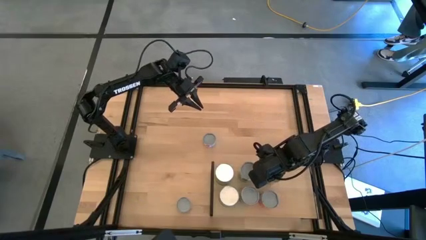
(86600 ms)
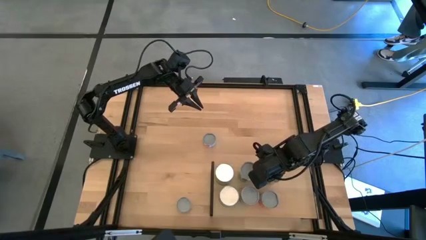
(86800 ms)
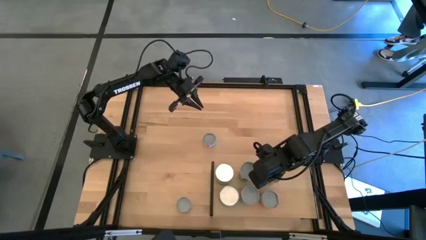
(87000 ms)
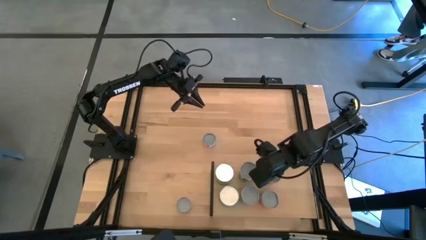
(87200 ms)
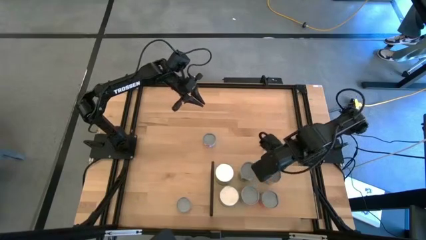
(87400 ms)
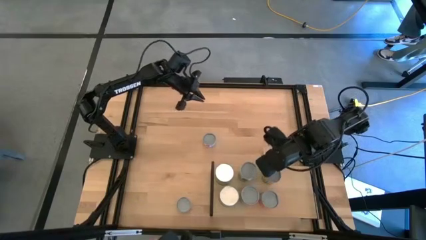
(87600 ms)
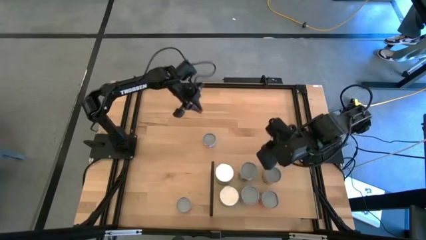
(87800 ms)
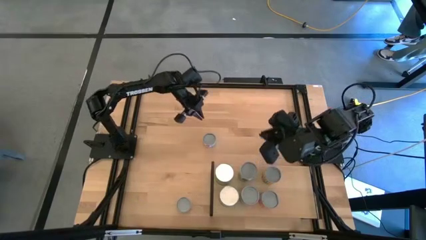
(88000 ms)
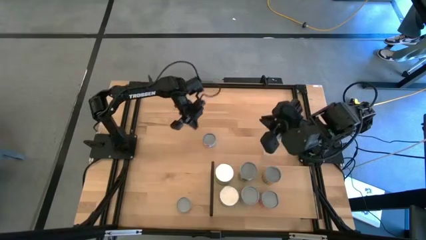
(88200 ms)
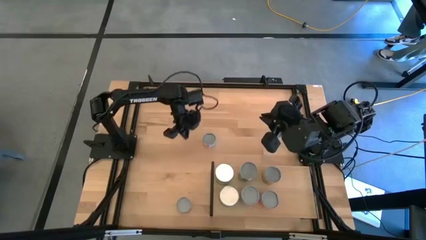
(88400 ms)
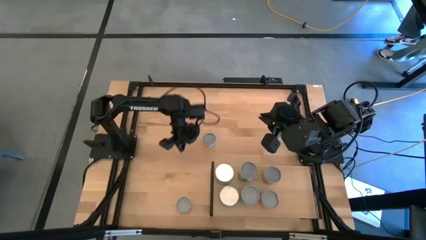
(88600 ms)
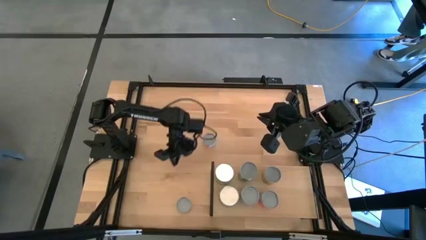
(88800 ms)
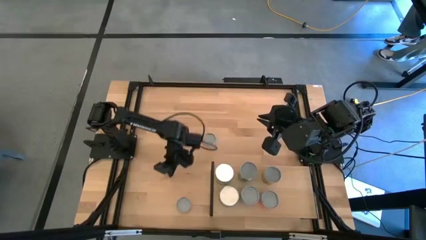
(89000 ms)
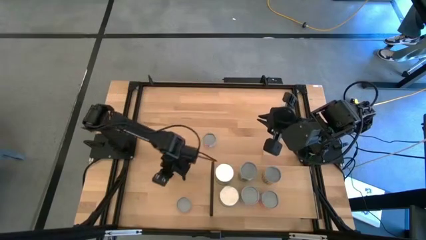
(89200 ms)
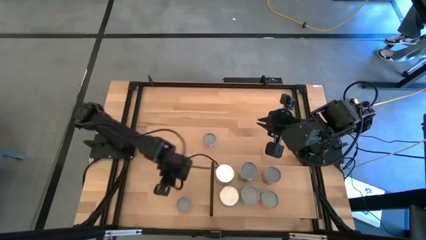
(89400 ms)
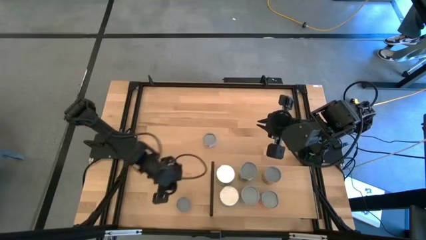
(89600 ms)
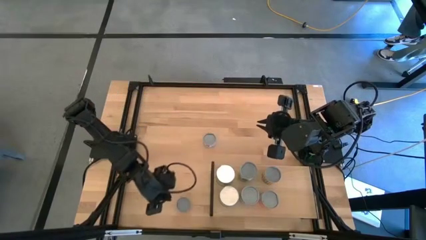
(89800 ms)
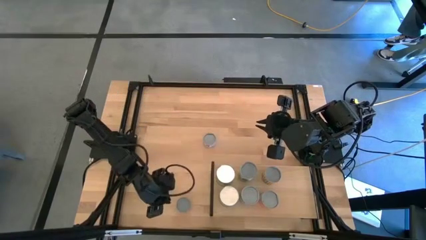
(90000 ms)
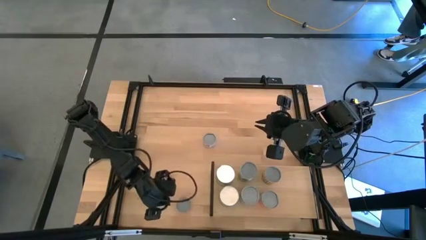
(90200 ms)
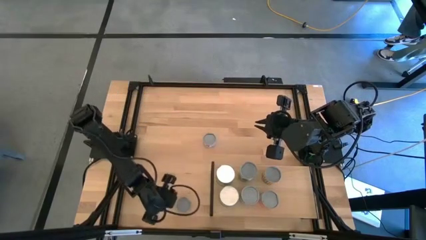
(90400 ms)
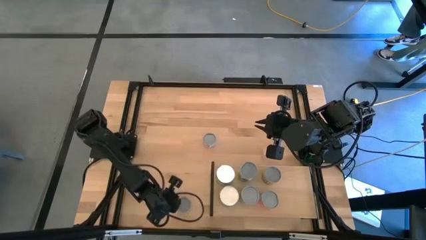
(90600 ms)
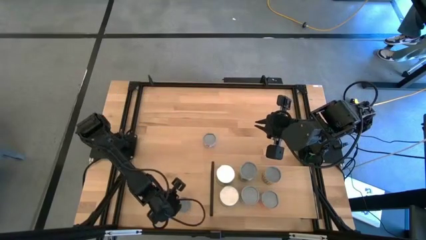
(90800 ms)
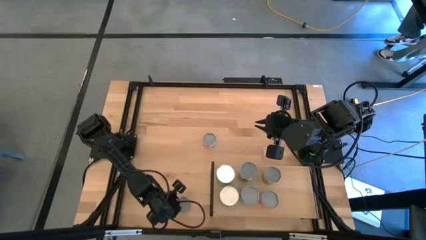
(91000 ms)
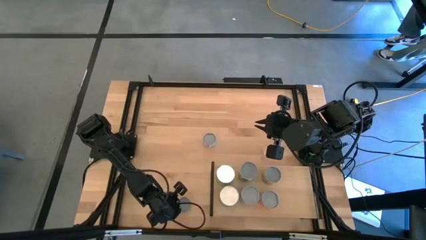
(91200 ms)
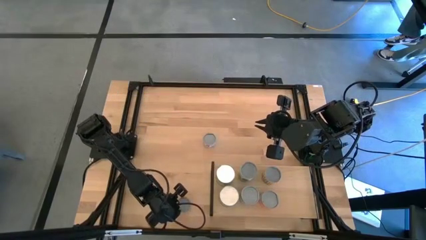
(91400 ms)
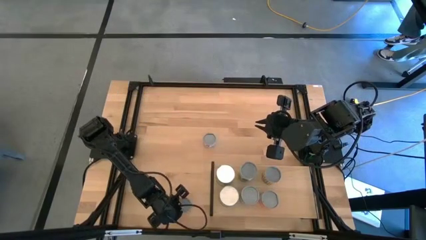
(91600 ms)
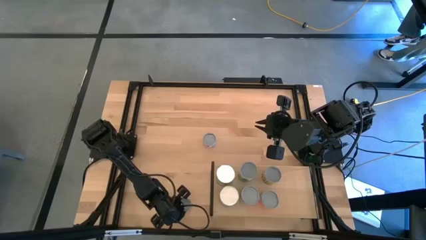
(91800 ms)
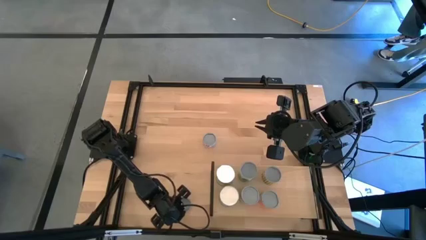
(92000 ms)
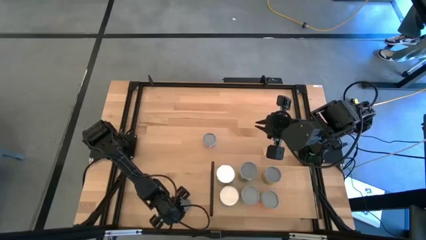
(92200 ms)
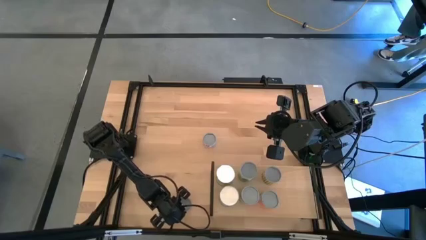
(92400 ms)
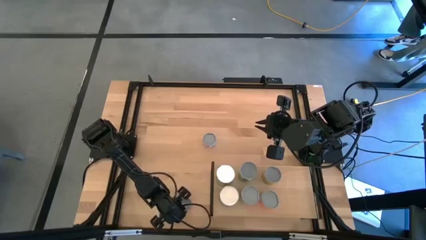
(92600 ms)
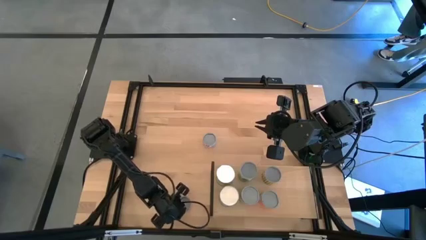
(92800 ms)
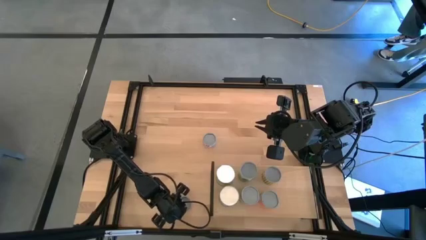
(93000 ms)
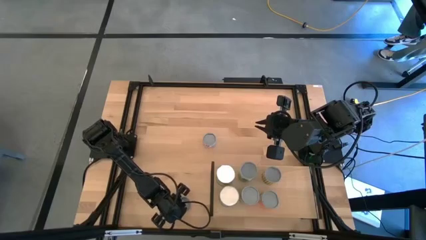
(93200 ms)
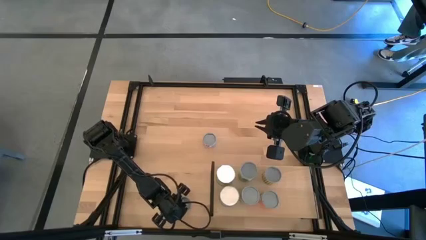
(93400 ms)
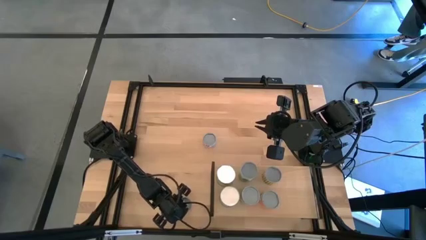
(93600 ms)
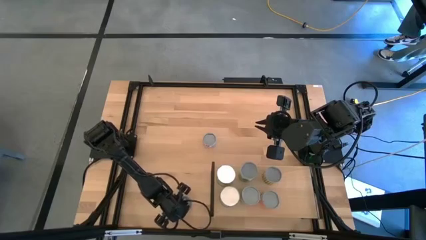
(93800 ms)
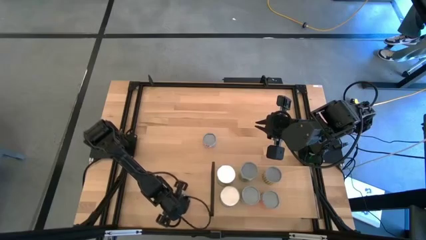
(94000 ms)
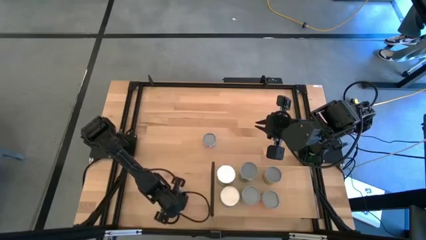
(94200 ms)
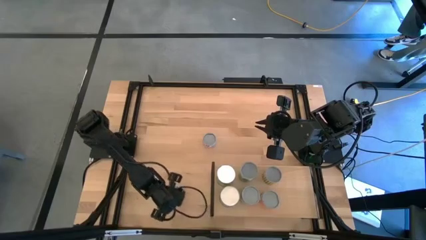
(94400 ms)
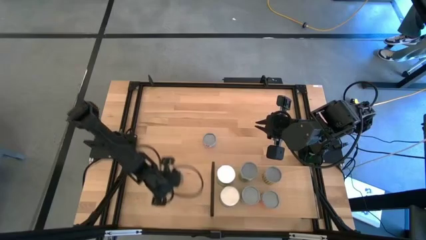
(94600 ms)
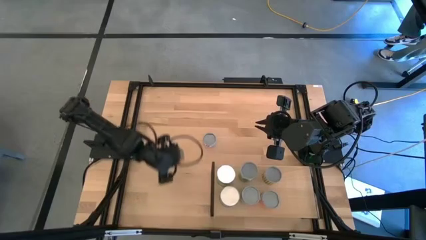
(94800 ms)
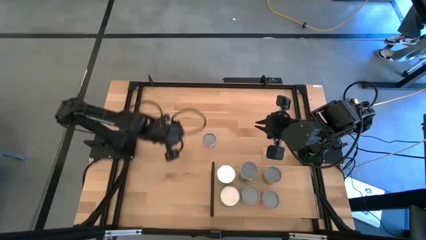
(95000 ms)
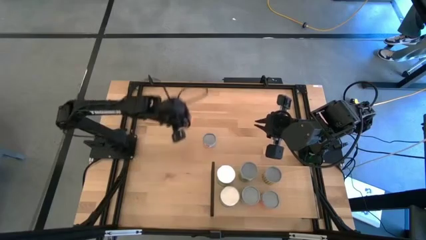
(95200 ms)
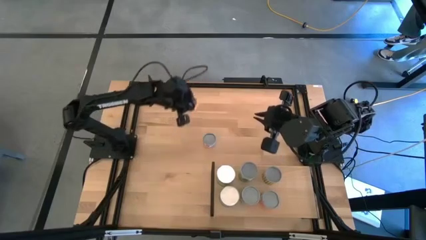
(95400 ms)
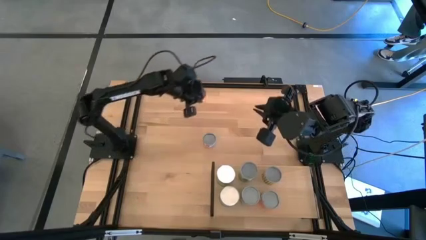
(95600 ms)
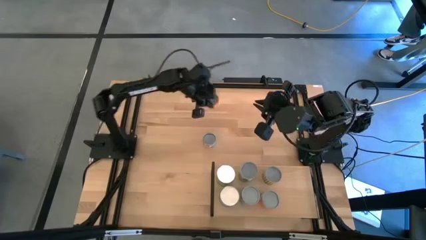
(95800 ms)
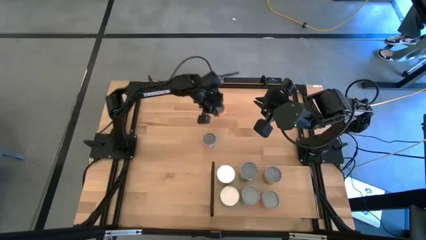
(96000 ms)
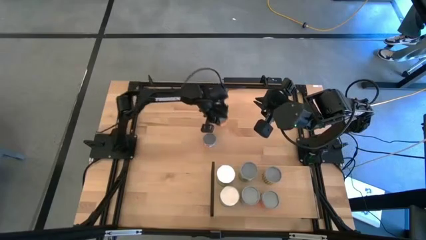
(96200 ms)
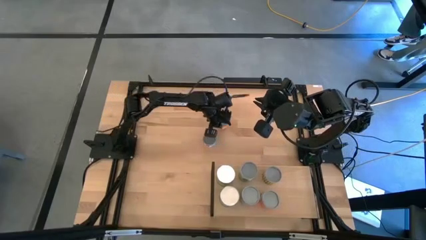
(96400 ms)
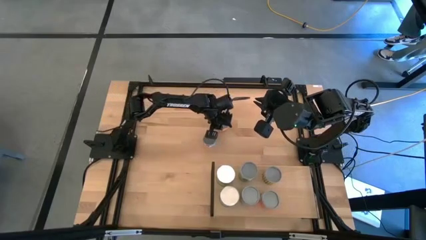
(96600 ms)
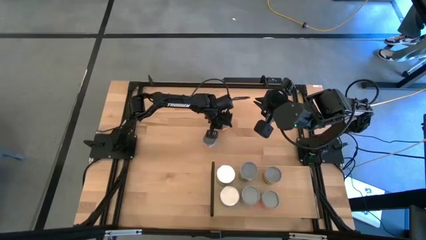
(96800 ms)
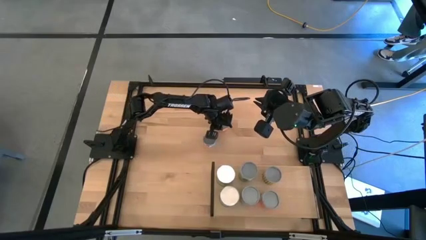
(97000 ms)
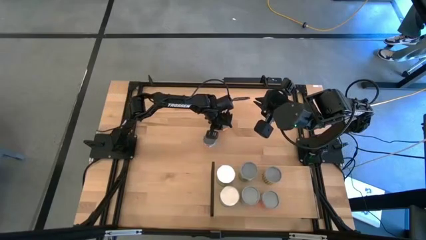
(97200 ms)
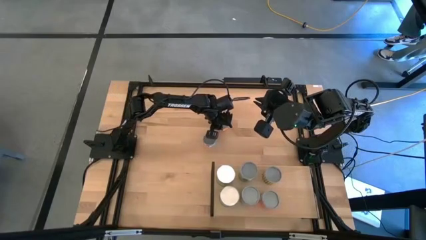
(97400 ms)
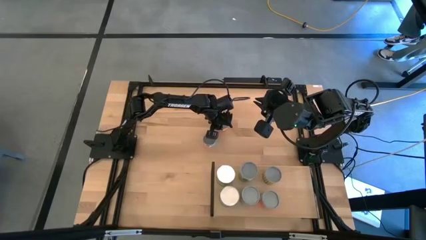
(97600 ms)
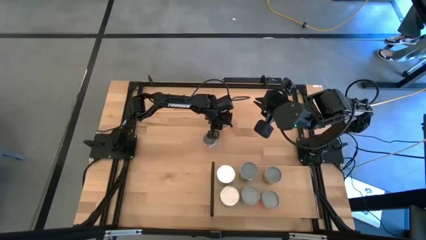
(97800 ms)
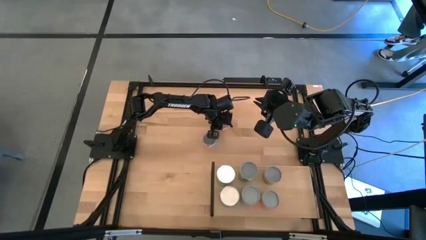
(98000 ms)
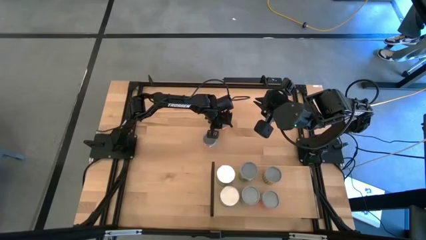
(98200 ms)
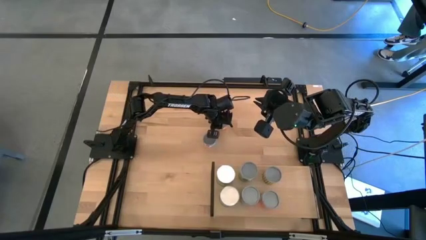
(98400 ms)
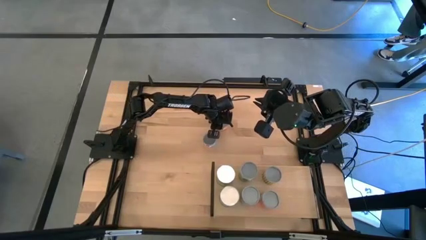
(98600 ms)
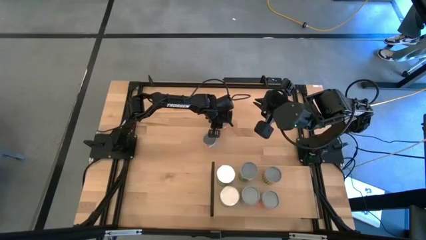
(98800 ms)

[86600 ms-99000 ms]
Task: Pick and place cans onto a shelf
Put the canned pineapple rings on the shelf
